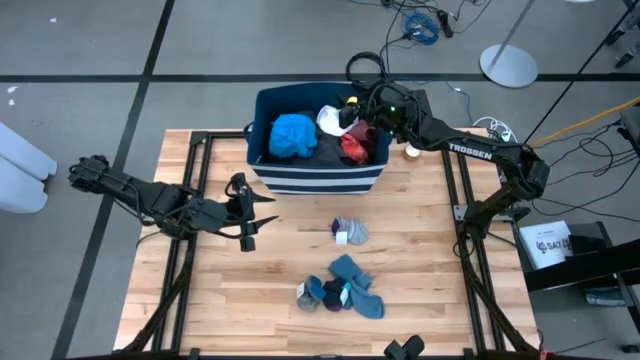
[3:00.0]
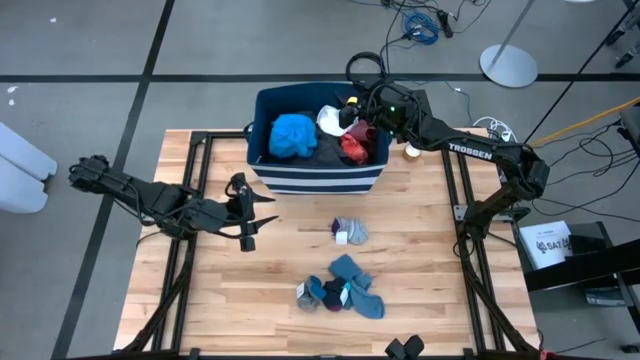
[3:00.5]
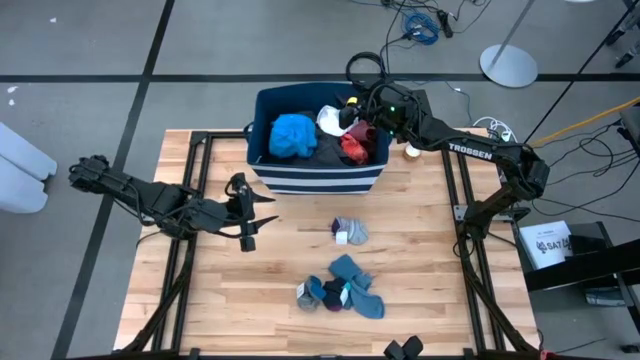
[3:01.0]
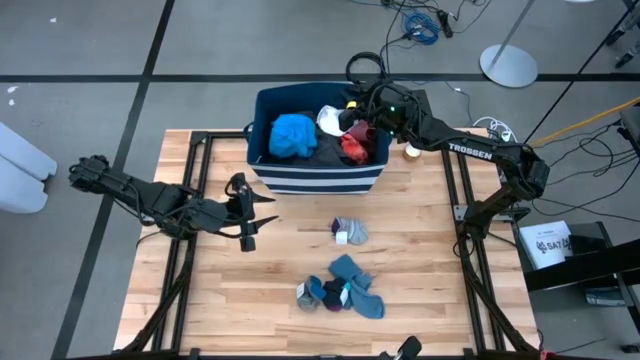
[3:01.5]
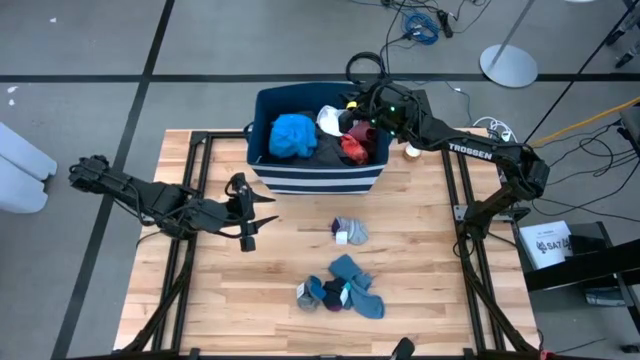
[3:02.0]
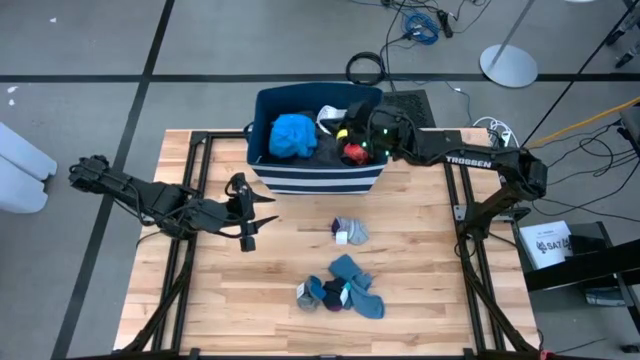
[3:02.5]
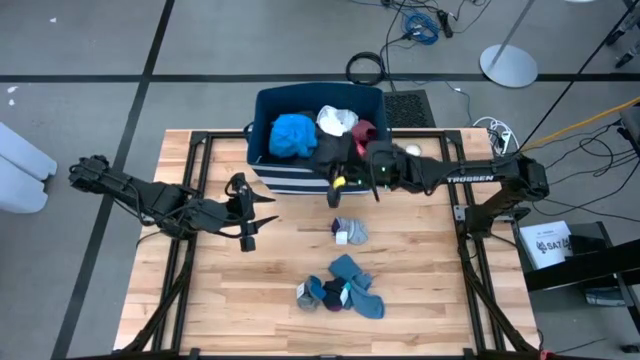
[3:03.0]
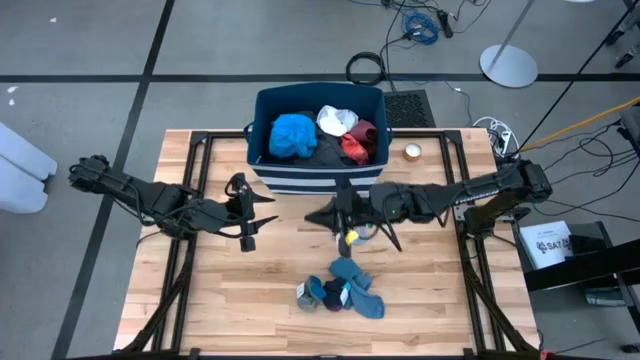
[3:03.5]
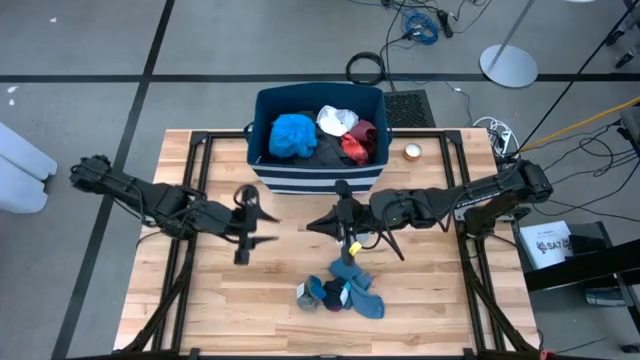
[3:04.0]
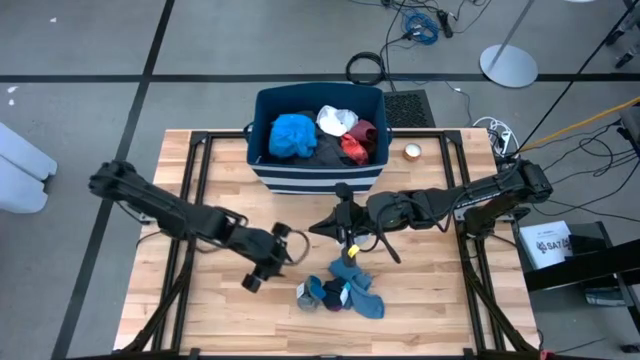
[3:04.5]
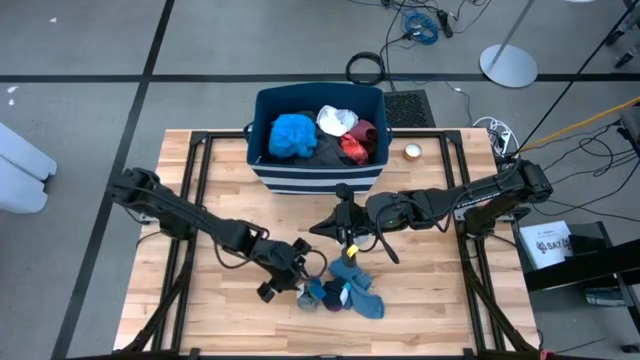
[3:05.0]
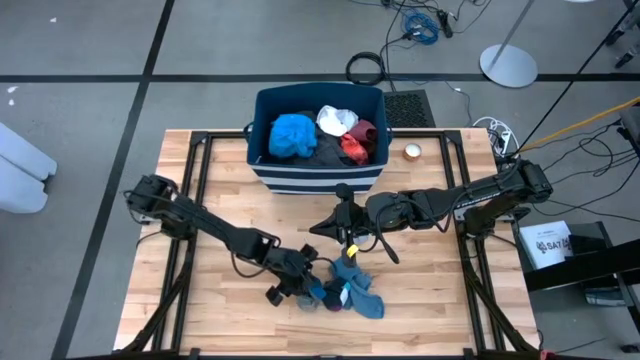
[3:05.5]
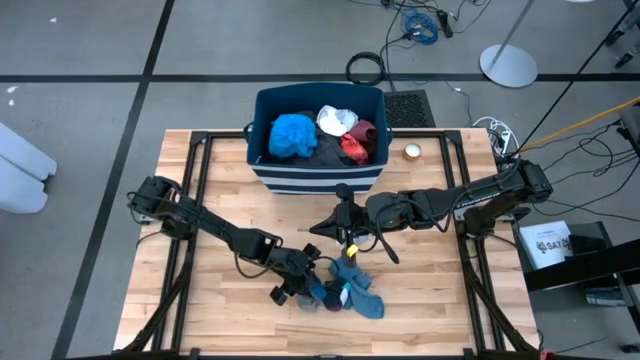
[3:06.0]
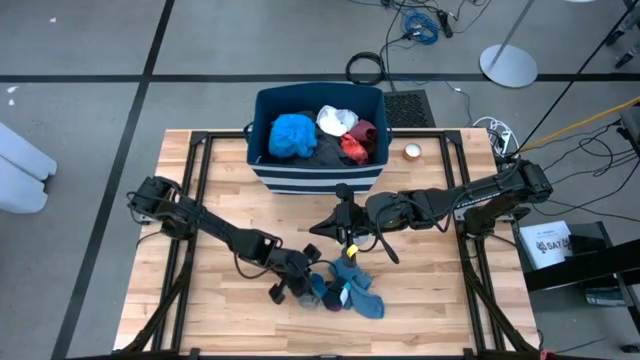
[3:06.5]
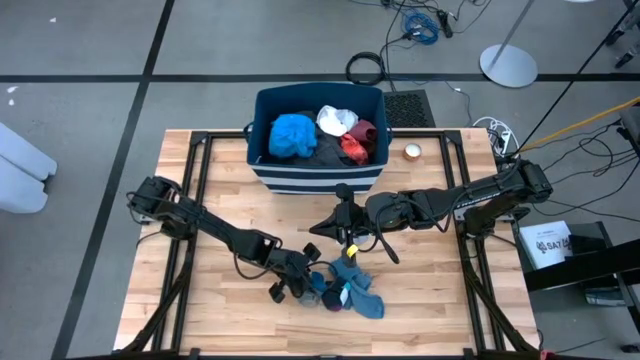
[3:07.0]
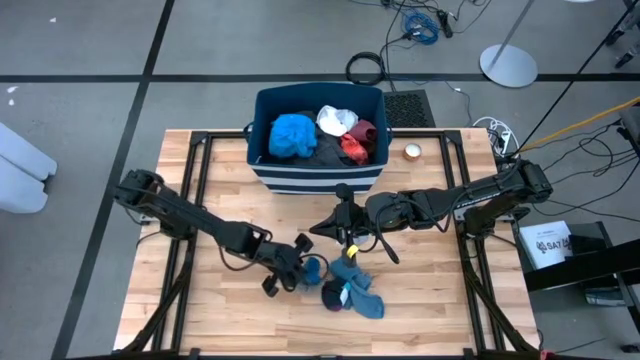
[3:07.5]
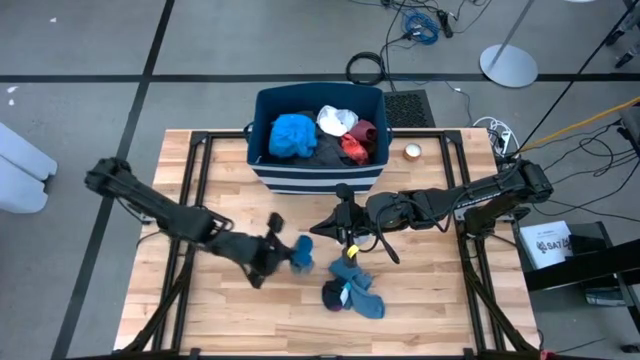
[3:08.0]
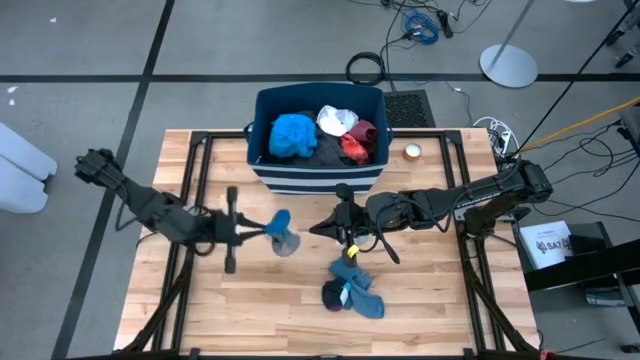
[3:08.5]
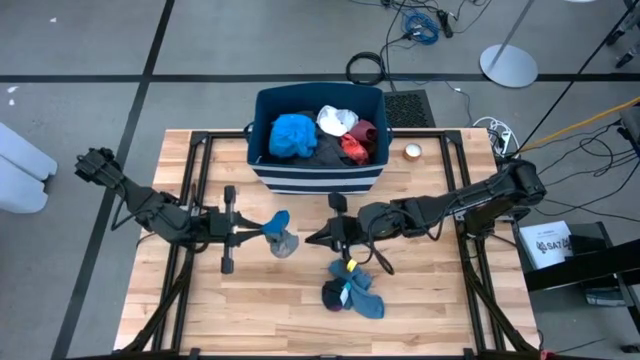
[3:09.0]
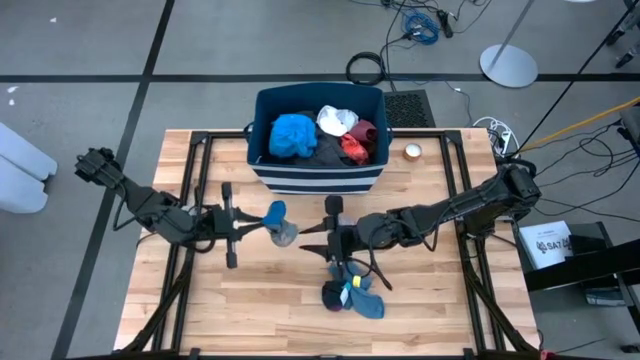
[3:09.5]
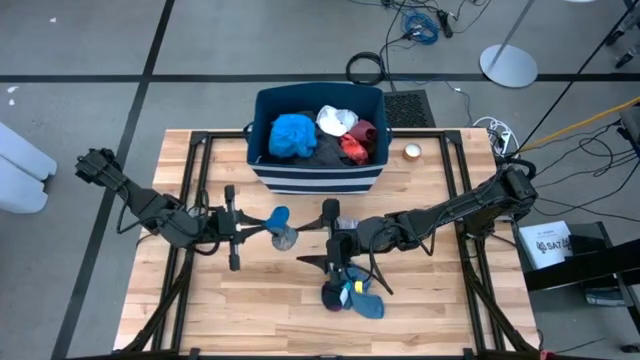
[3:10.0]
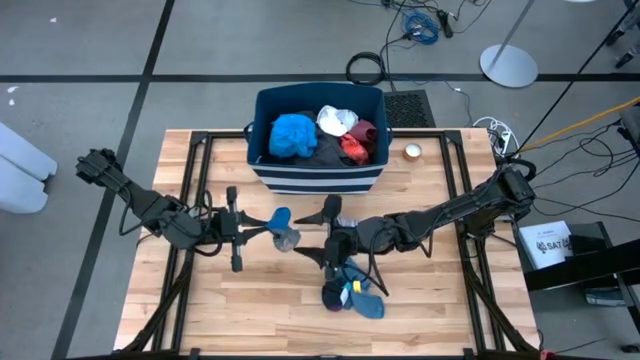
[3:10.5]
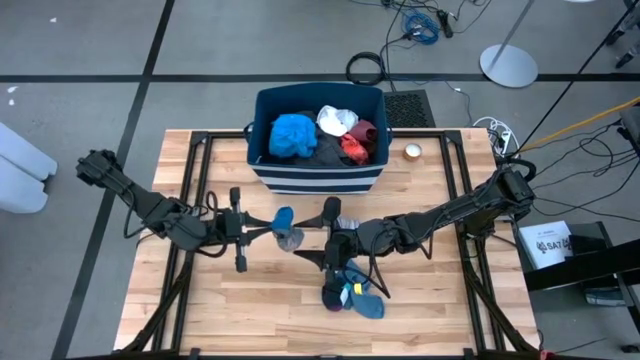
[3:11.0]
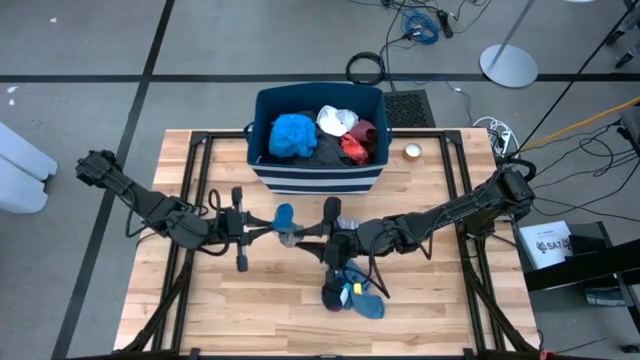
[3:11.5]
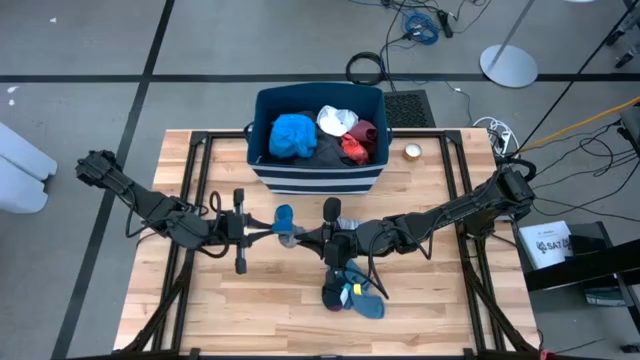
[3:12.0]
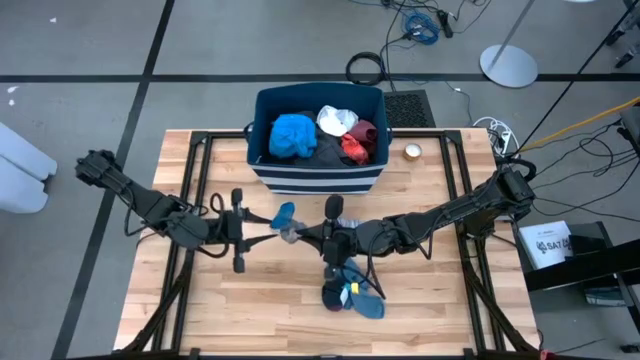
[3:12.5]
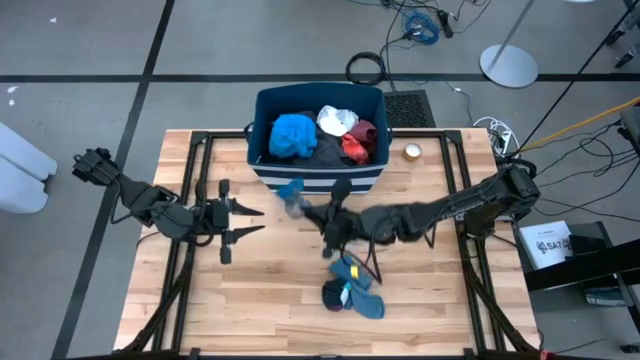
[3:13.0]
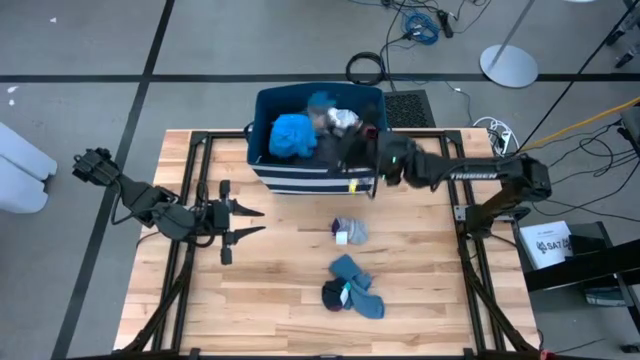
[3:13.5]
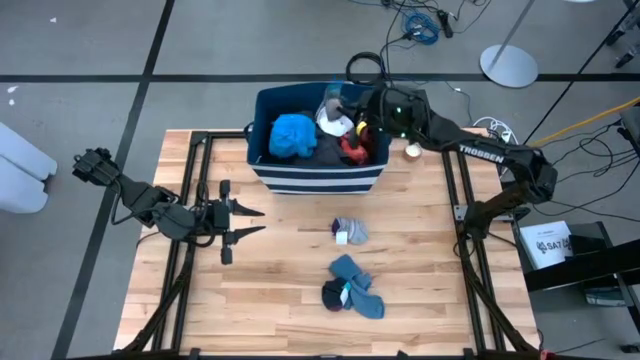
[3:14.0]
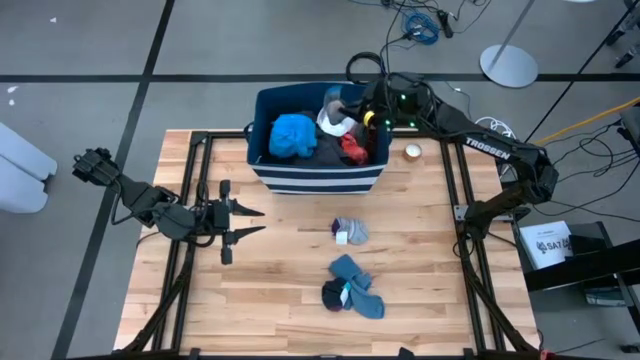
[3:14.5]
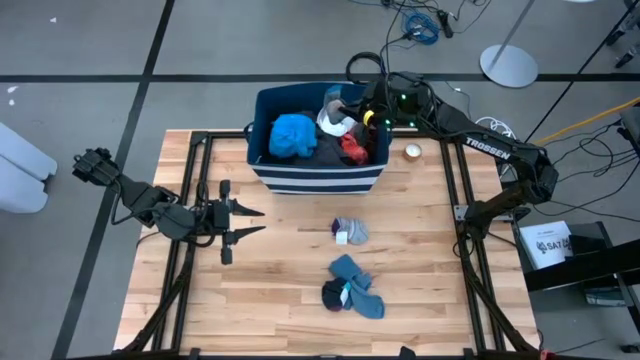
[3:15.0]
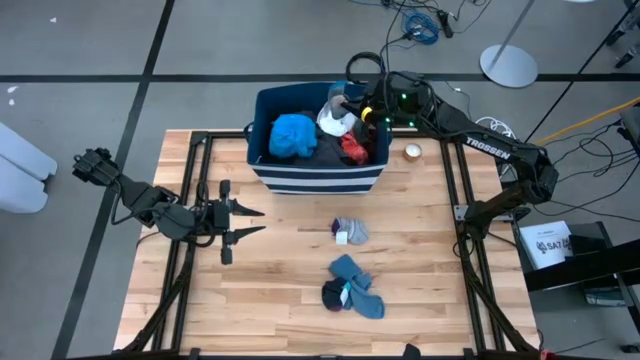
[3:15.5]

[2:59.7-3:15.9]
Task: Sort clothes
Put the blue and gray sock into the blue laundry bin

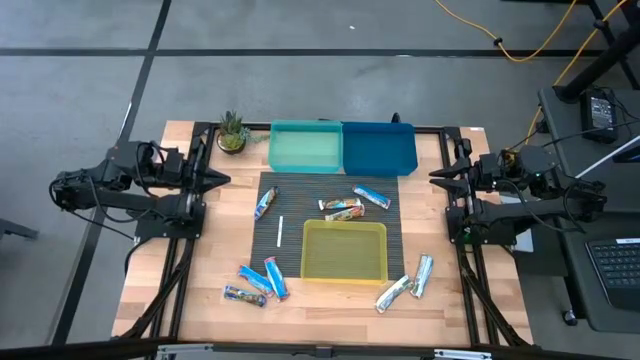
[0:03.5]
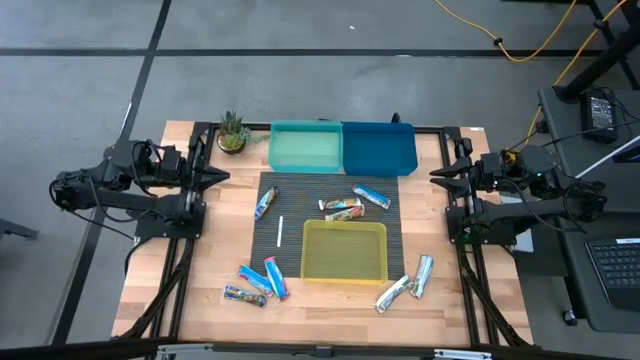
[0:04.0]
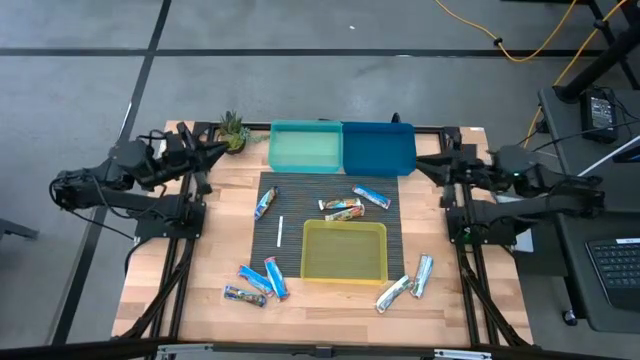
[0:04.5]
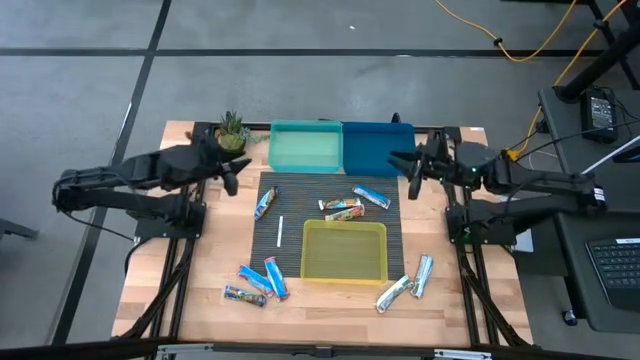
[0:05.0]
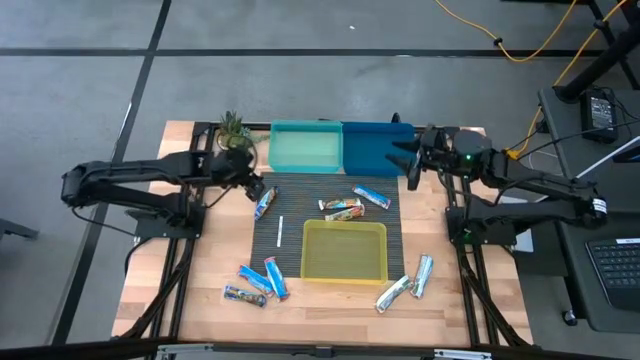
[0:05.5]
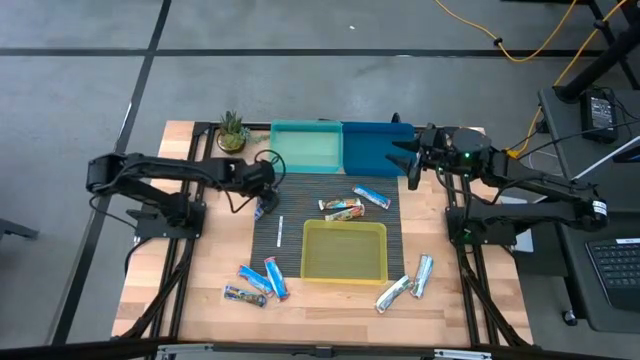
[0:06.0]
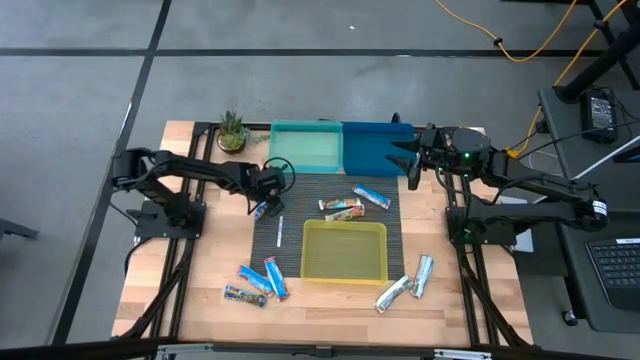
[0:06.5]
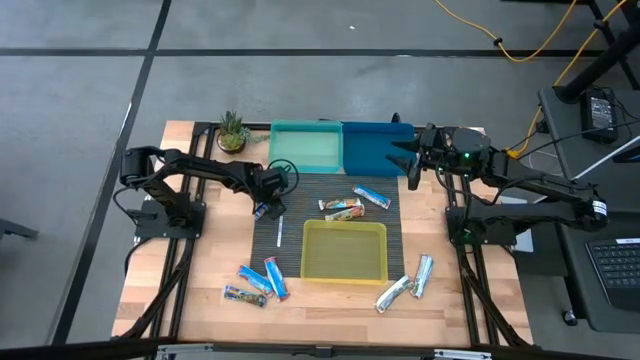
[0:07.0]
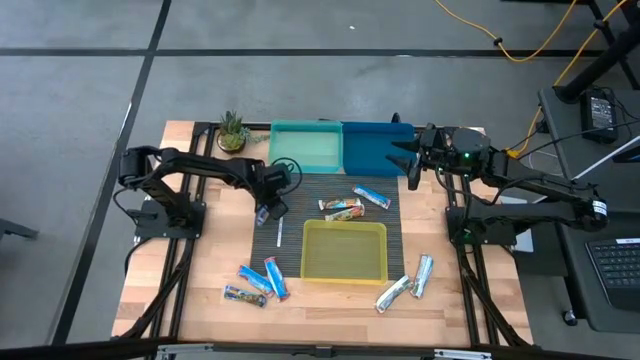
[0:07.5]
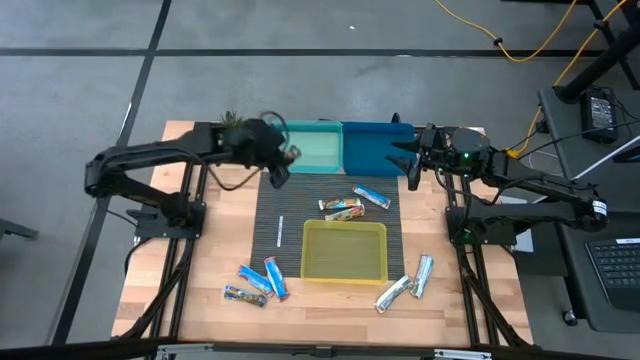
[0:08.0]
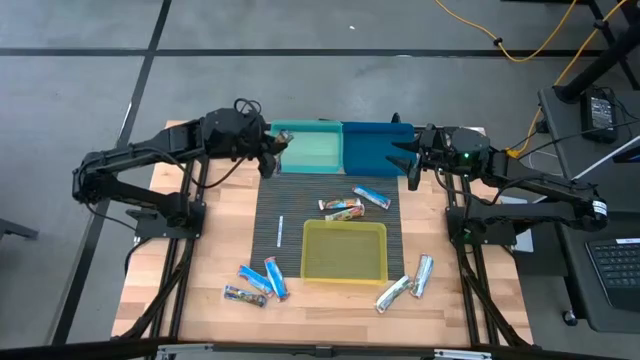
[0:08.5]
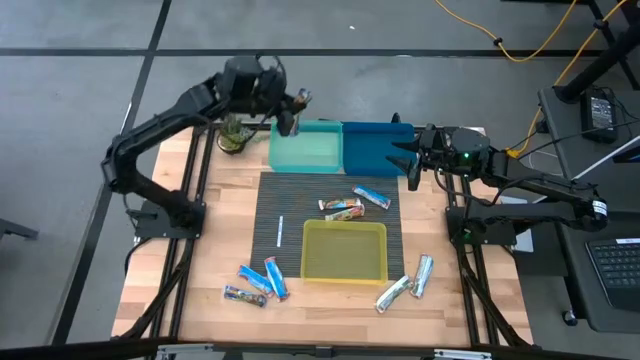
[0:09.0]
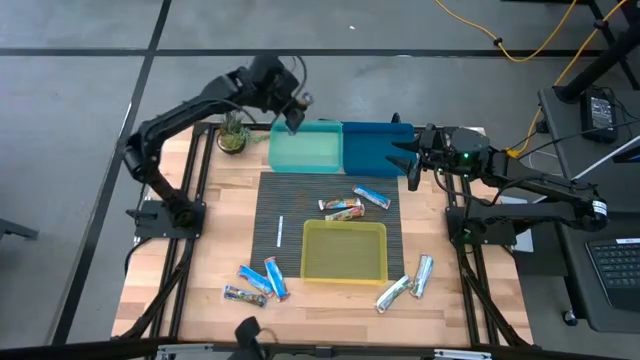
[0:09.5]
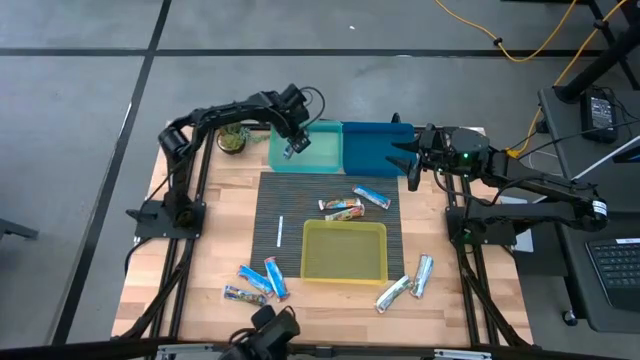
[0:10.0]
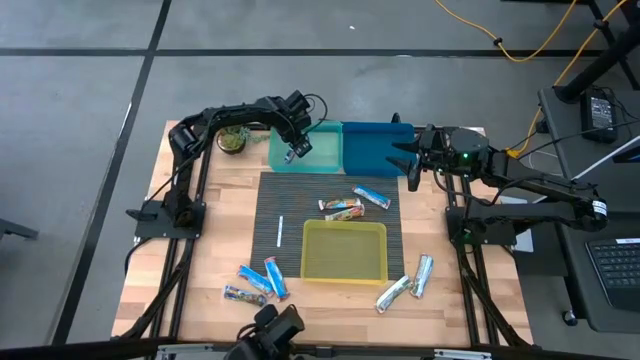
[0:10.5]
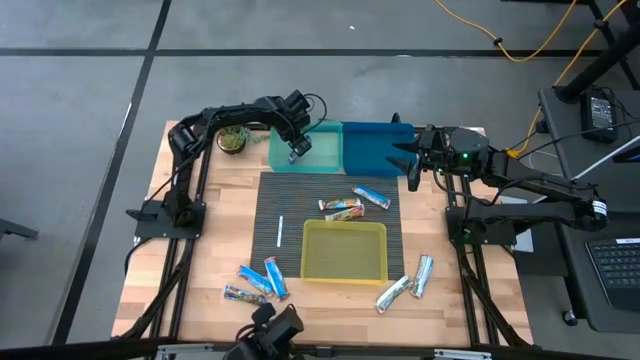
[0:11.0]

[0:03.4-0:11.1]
Task: Pick and place Granola Bars by type
Put the blue granola bar into the green bin
